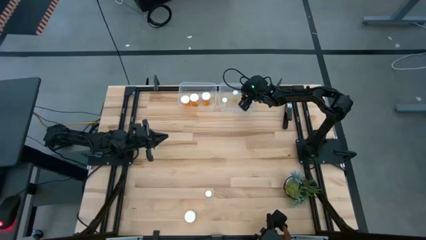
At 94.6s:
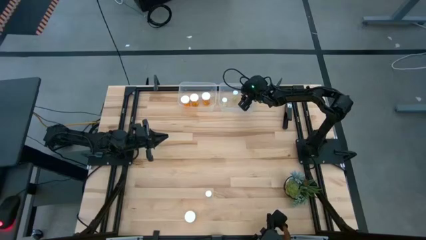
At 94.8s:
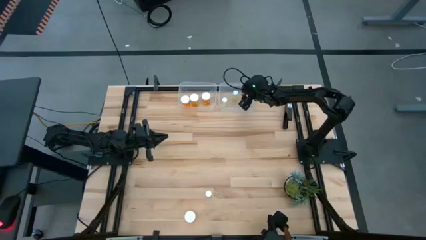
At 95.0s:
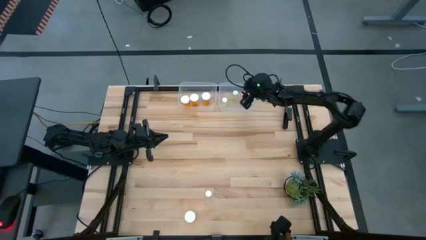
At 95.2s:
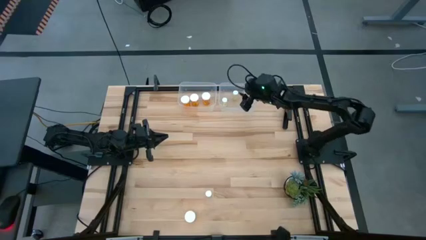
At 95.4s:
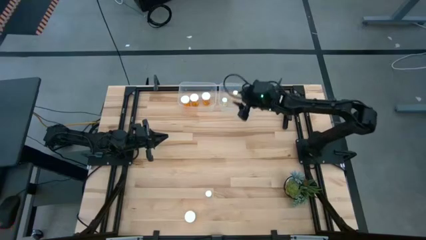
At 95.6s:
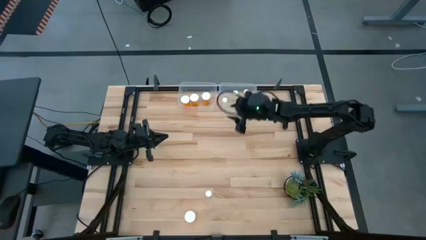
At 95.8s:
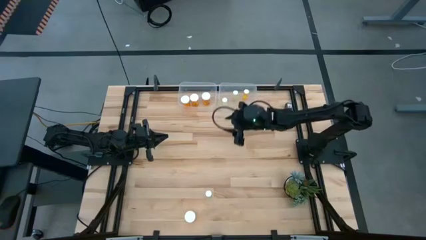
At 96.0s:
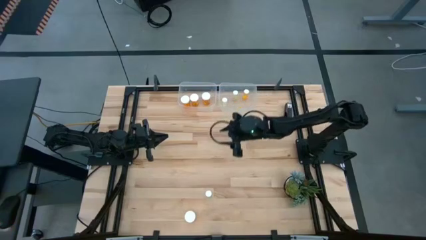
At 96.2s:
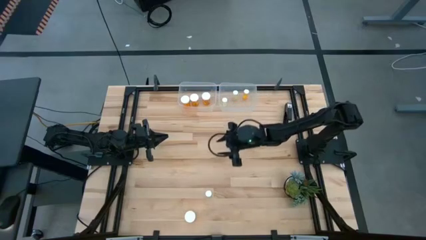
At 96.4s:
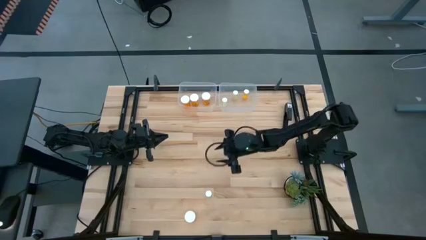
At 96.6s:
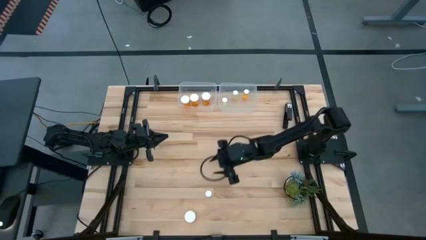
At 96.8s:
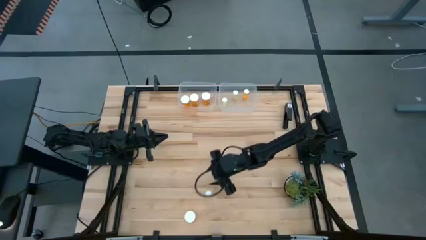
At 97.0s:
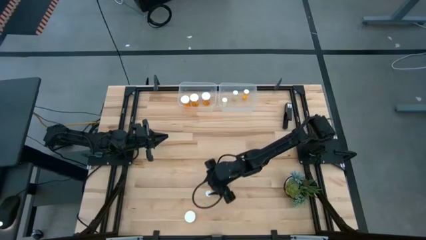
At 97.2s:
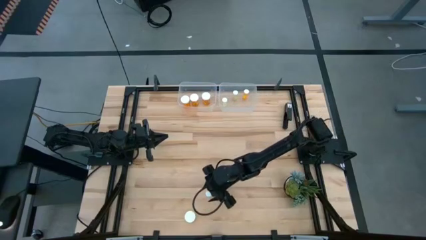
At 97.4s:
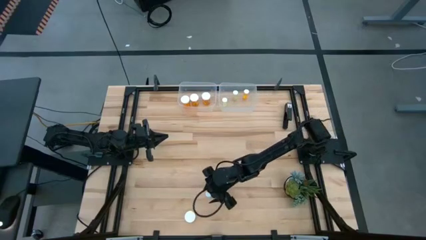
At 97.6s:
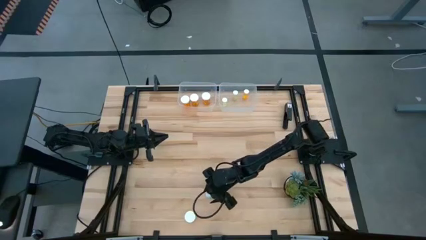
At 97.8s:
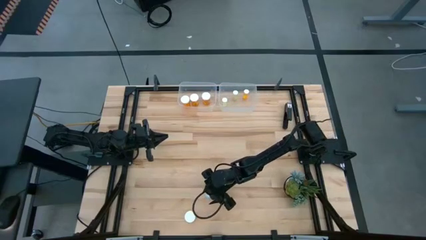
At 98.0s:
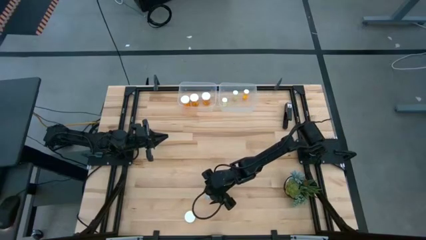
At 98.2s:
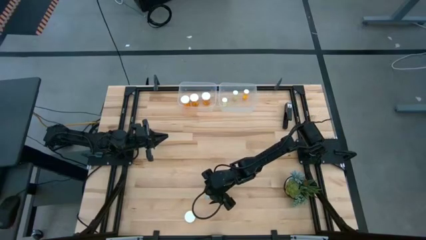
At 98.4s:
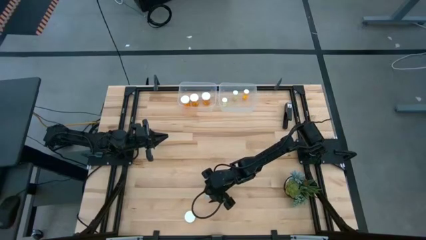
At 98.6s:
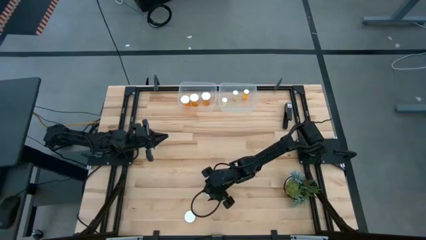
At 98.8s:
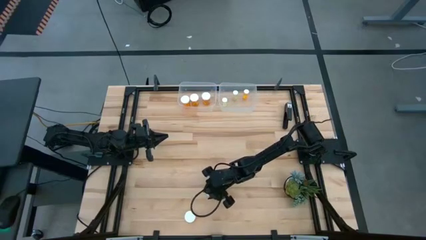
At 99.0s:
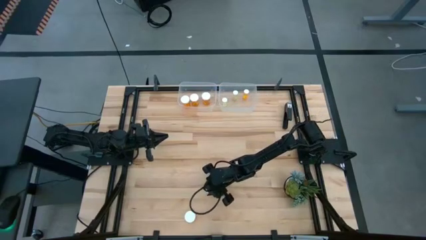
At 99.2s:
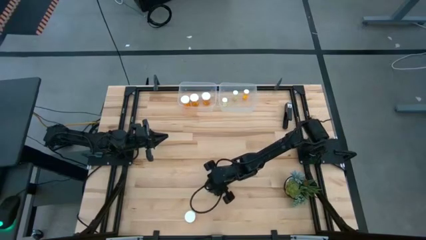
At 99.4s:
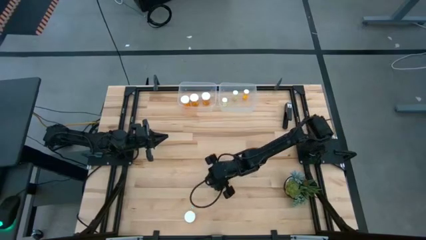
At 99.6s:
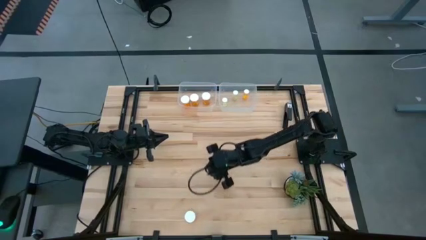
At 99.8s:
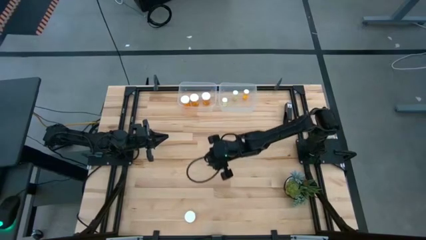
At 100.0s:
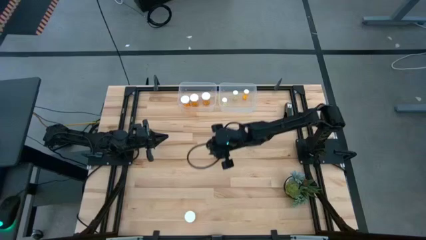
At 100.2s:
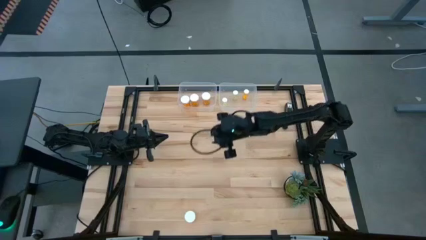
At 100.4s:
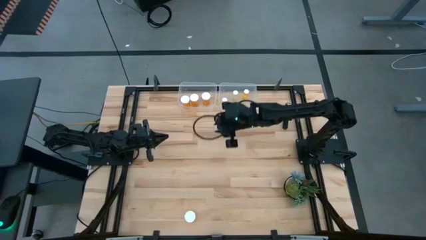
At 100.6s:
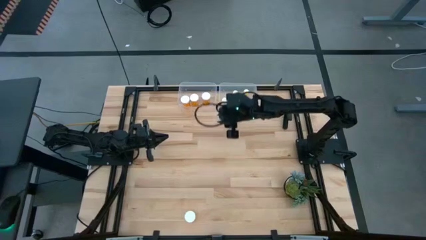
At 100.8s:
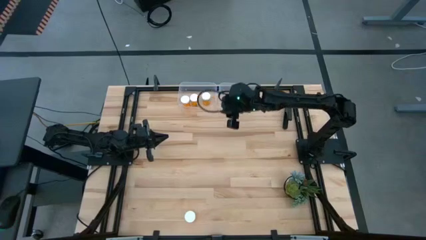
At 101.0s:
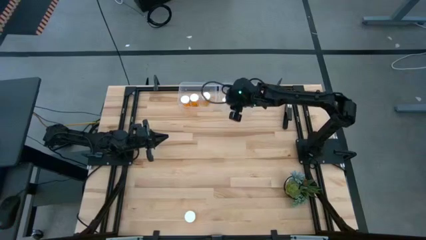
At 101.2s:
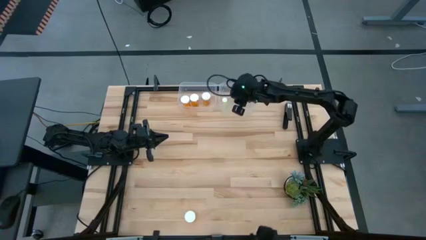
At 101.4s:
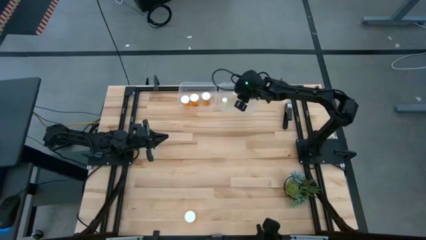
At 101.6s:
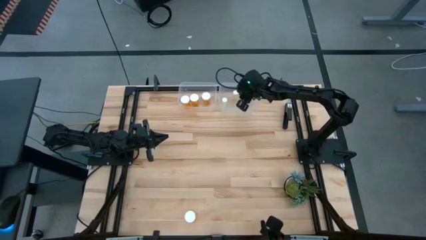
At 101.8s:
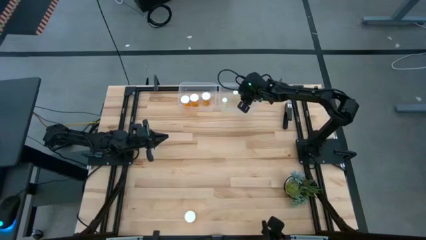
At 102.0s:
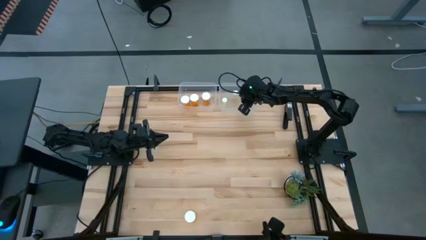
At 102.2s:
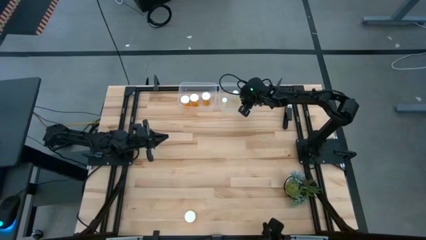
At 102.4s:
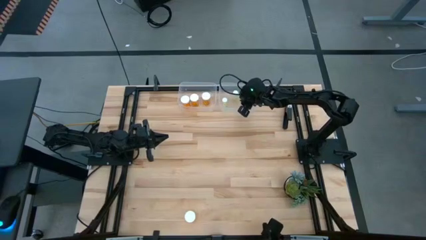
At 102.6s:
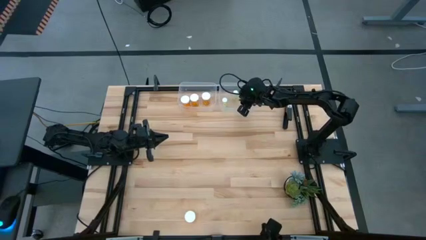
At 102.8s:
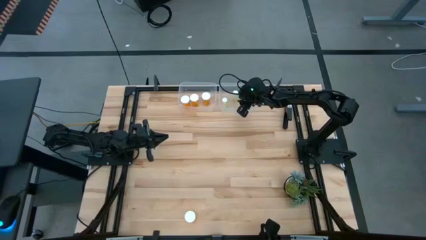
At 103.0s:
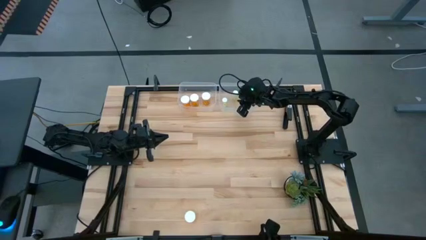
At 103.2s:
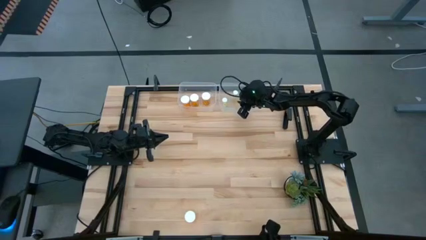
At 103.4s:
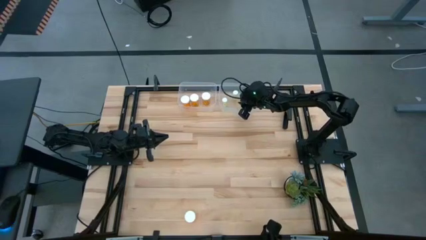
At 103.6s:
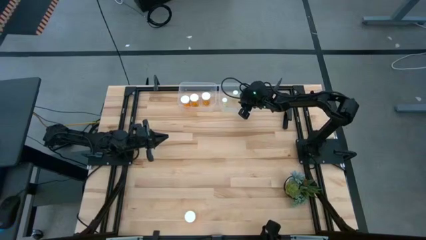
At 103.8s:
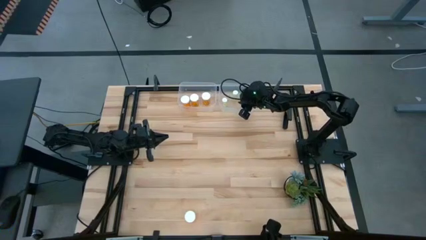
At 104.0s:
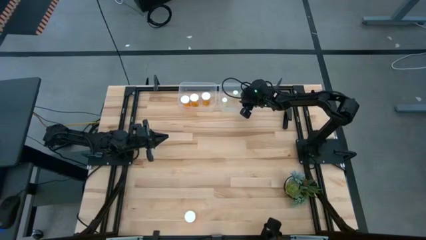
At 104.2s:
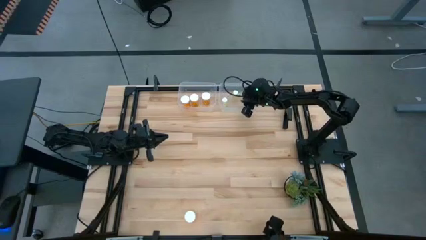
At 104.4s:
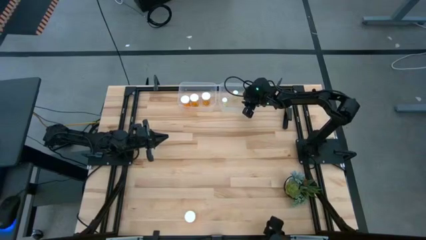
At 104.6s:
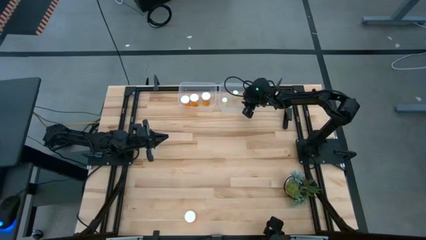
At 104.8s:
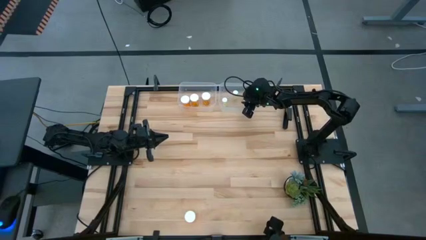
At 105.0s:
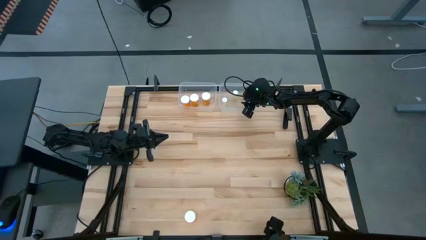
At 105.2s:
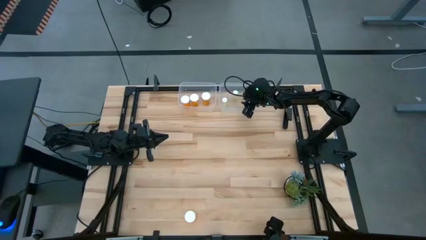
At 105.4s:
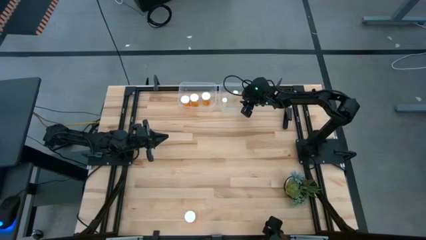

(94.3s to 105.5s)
Task: Pick and place medicine bottles into bin by pill shape (circle, oval)
Put the yellow pill bottle into the right transparent bin

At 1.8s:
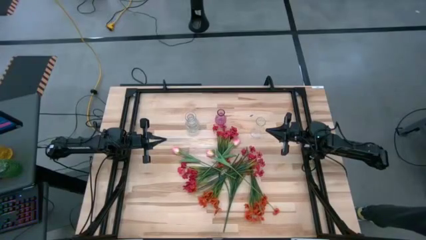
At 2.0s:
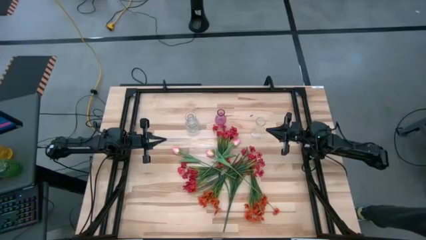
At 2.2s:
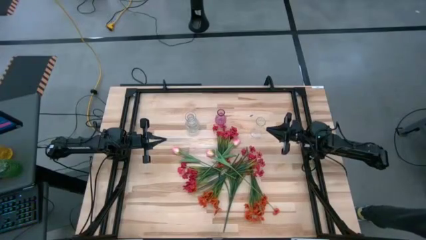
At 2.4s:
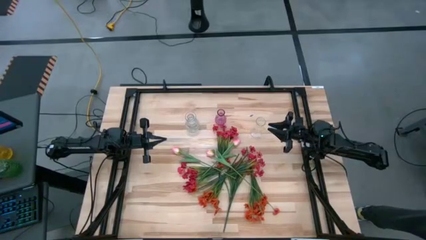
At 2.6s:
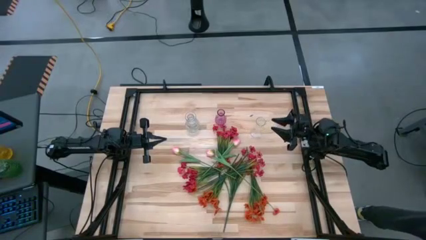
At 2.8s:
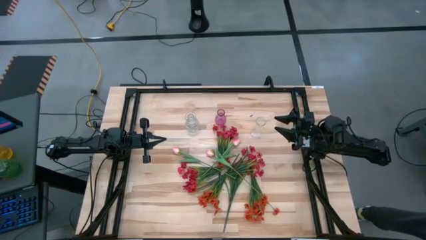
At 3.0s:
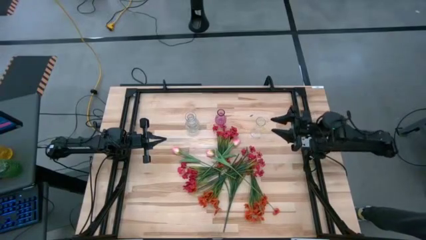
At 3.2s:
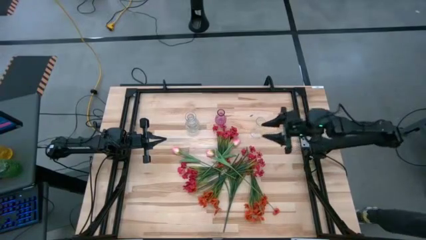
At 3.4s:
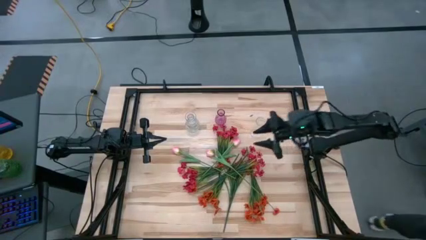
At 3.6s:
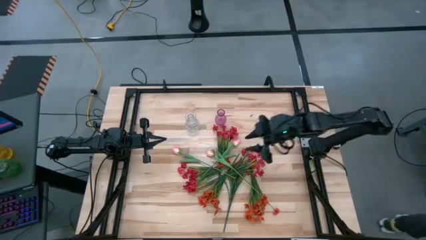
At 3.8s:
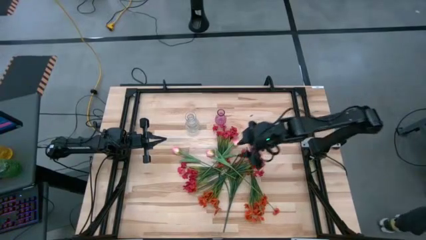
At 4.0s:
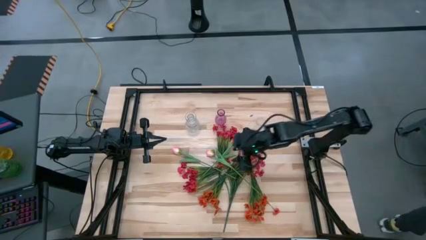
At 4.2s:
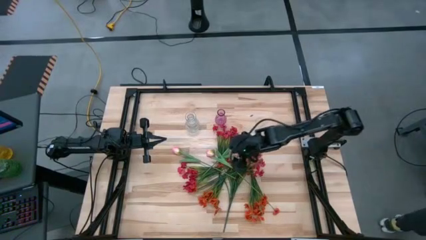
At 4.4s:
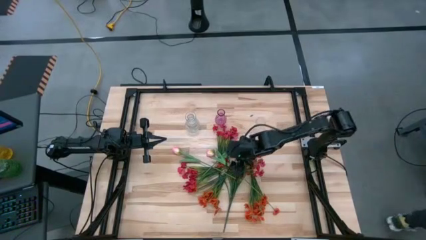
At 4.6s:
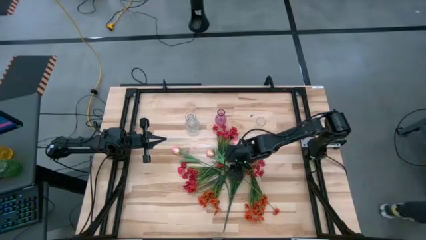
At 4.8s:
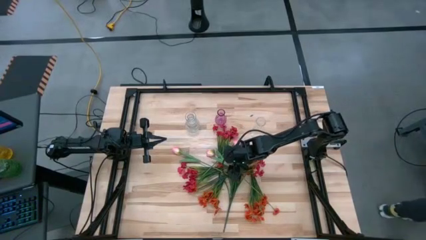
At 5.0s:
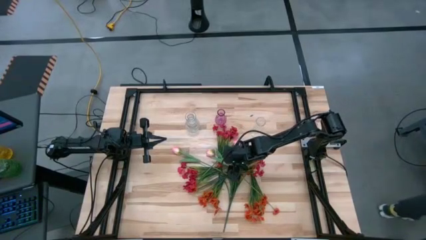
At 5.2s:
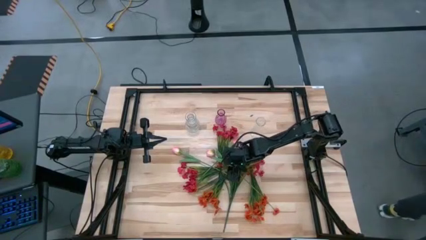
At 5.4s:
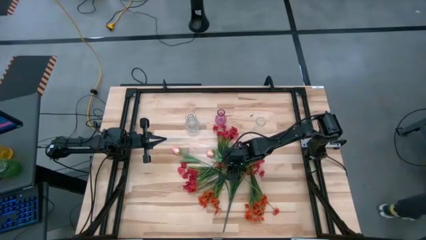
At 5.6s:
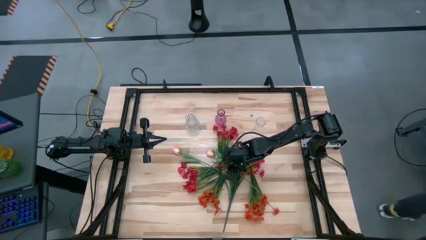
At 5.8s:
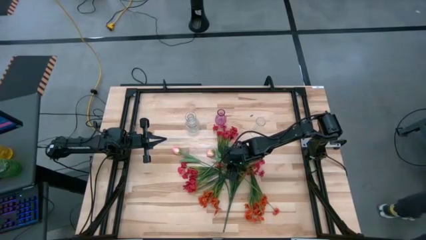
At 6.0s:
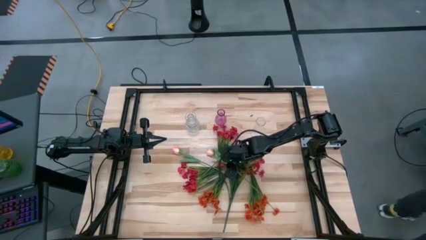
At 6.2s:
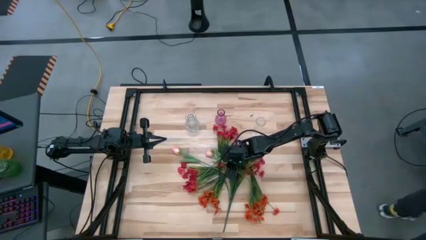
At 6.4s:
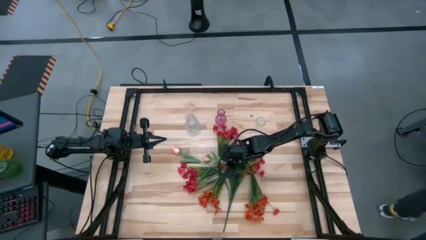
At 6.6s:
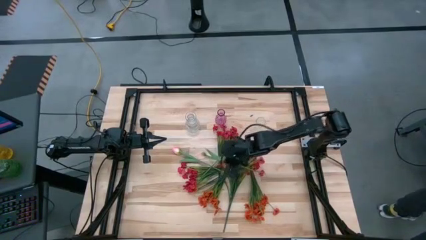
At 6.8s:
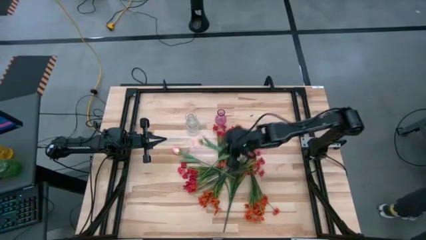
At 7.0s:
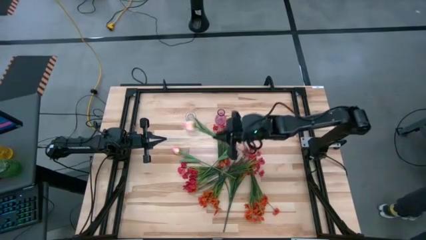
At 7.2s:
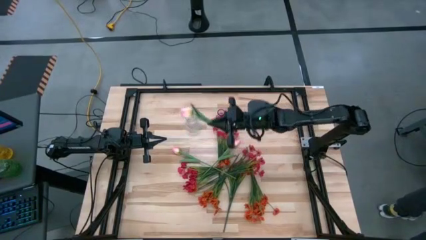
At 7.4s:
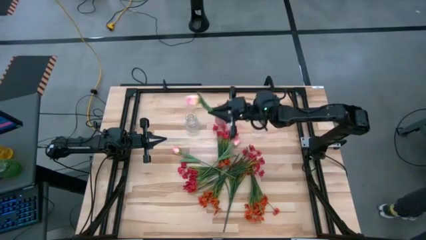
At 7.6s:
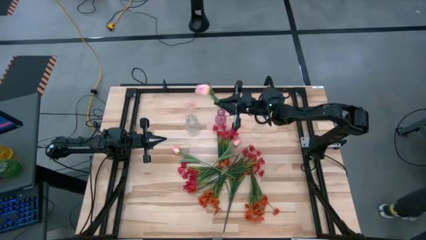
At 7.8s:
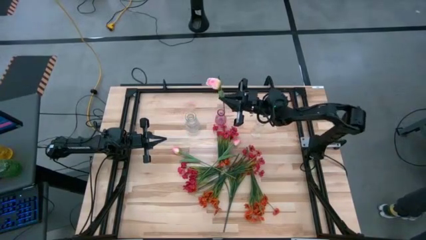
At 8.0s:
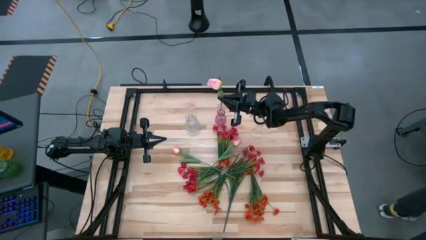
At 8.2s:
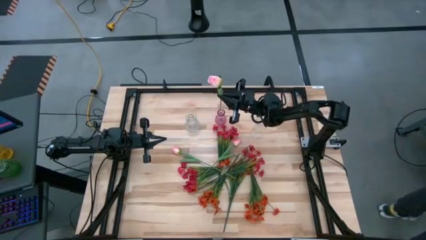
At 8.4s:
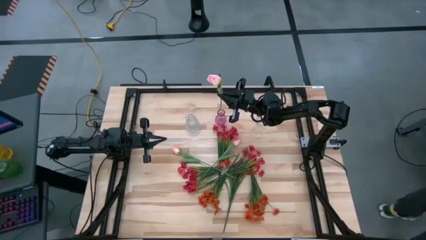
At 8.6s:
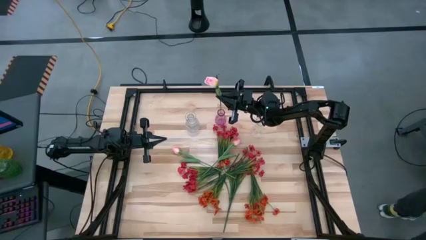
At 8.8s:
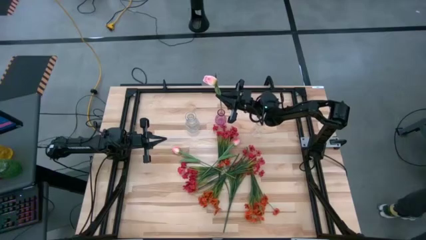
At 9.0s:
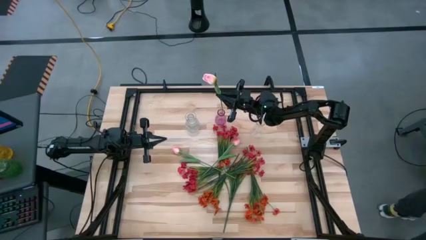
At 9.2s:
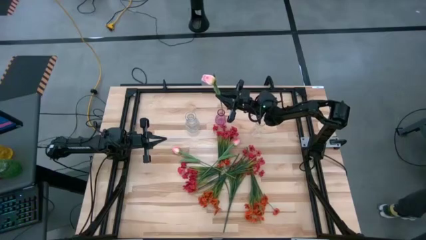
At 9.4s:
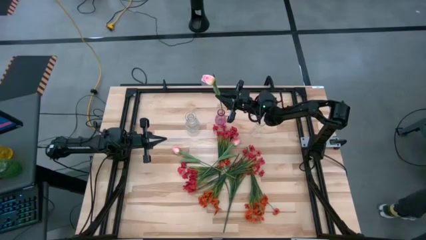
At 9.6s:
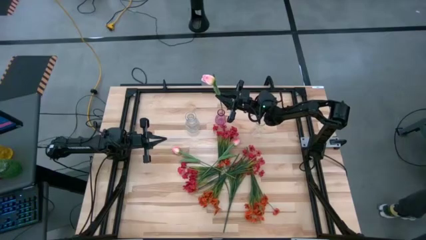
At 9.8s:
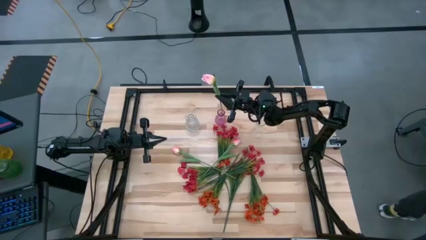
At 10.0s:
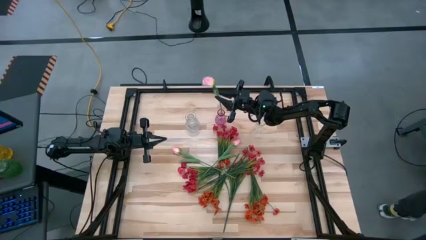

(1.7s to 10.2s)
Task: Sort flowers into vase by color
Put the middle pink flower into the purple vase
